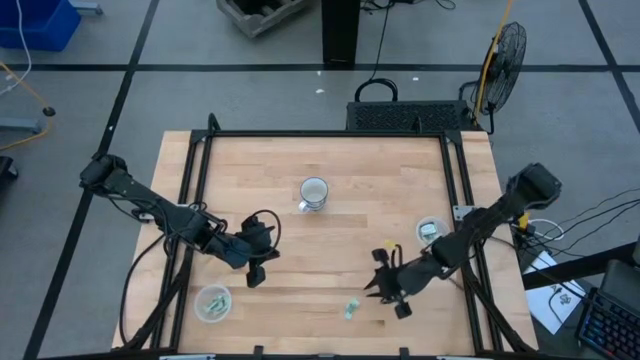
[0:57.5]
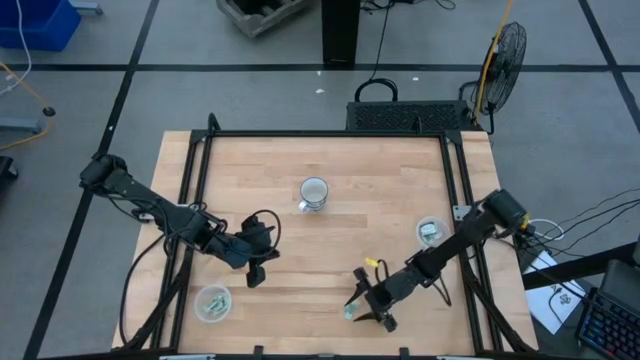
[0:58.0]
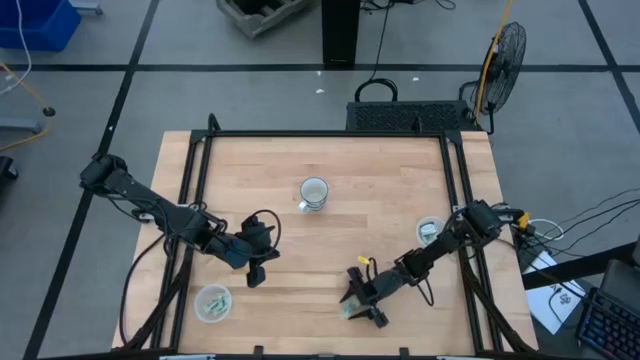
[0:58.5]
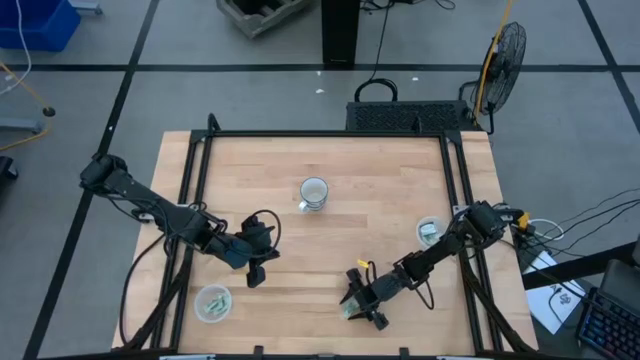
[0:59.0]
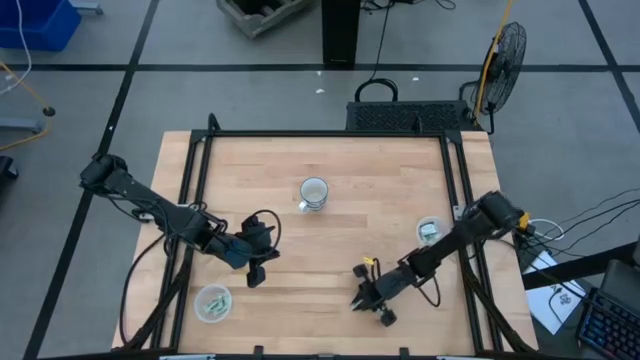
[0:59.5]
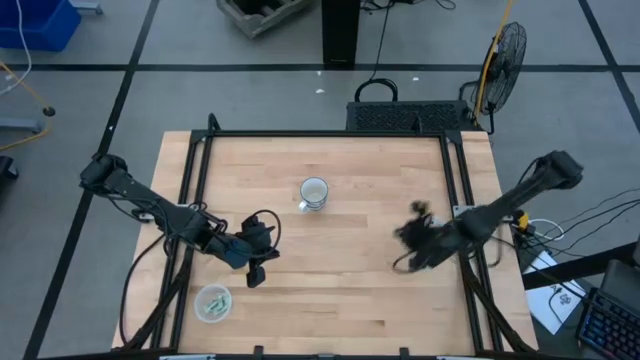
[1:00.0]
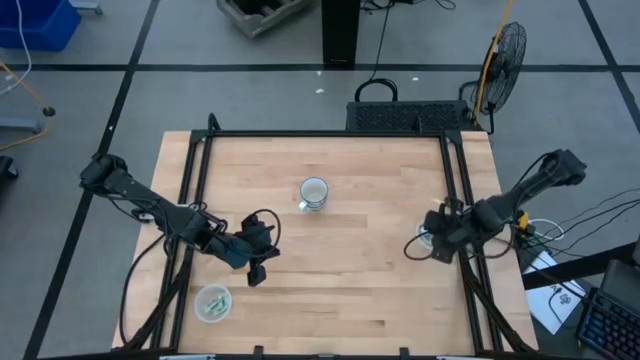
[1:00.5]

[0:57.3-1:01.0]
Task: Pick and place Stevia / Truvia into bins
Put the green stevia packet into the right transparent container

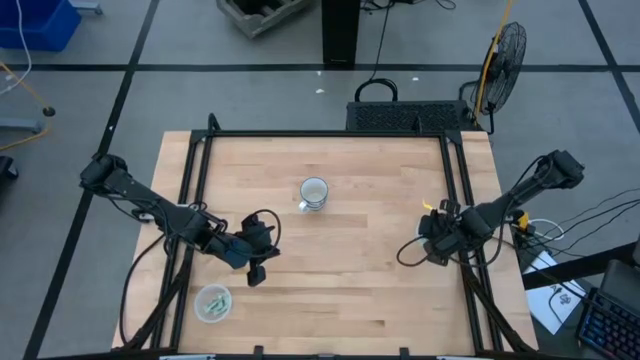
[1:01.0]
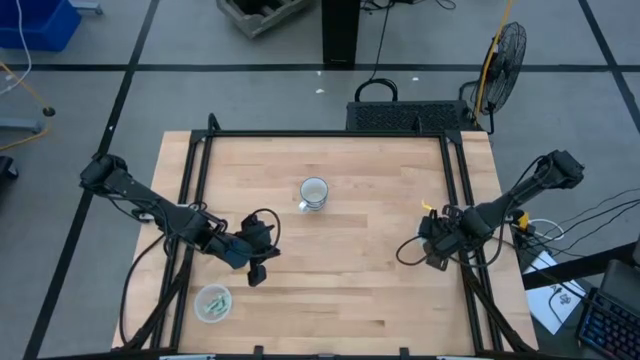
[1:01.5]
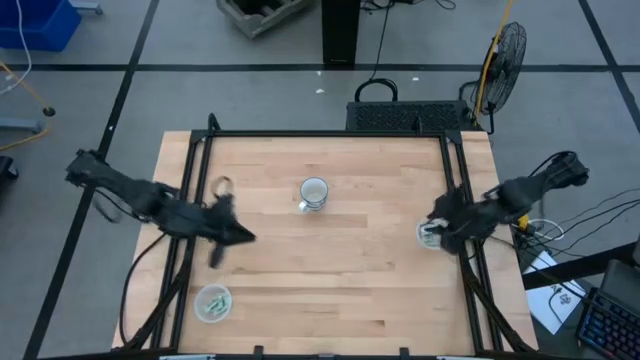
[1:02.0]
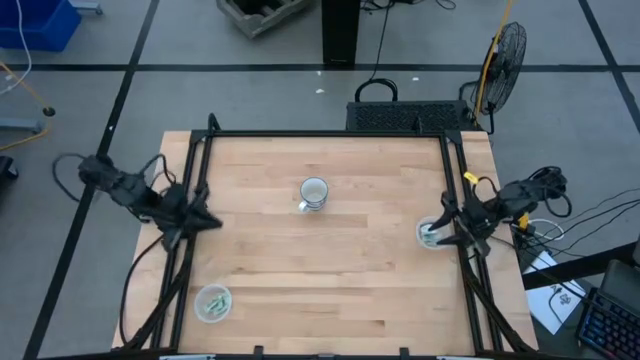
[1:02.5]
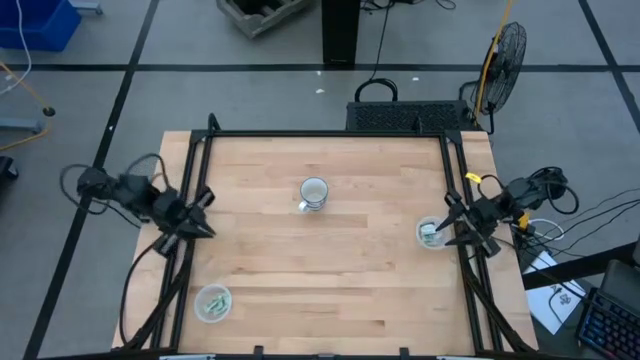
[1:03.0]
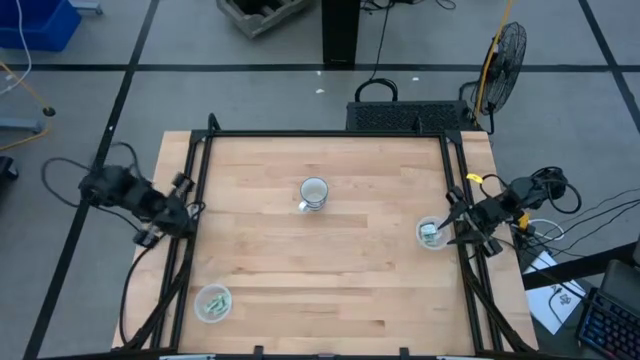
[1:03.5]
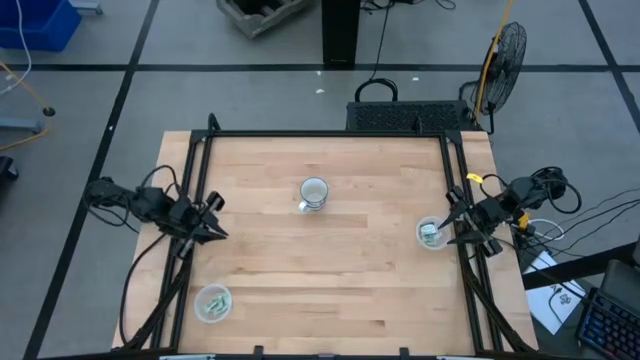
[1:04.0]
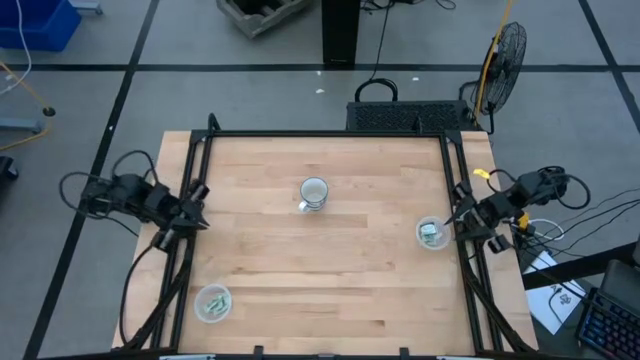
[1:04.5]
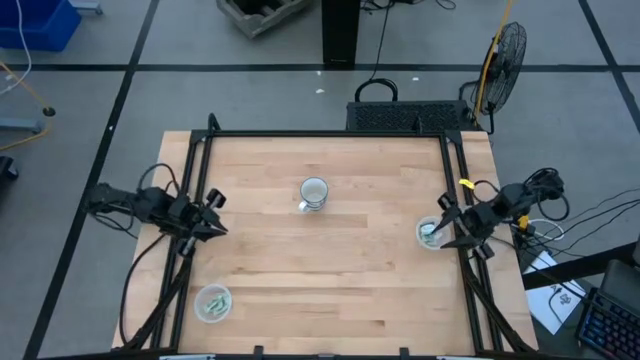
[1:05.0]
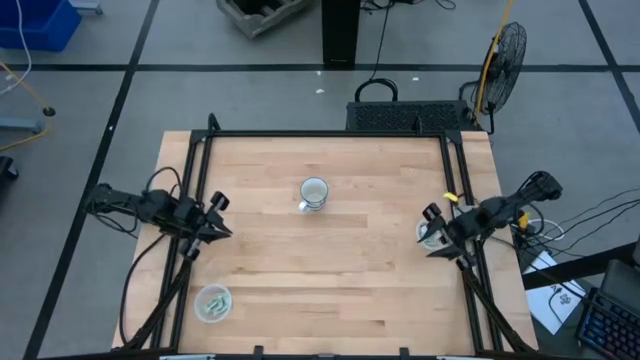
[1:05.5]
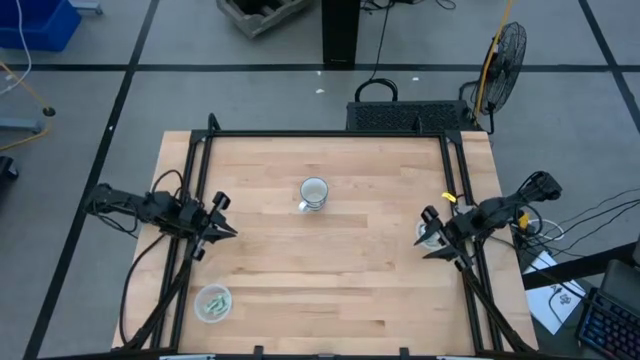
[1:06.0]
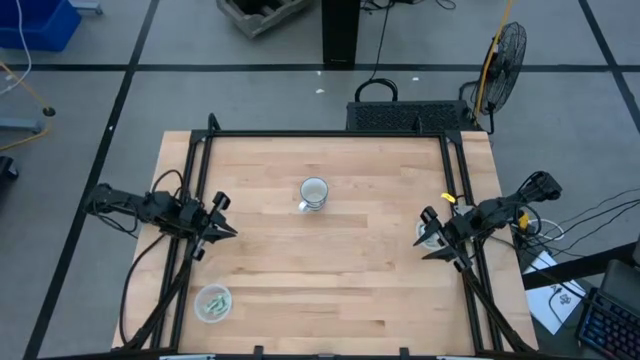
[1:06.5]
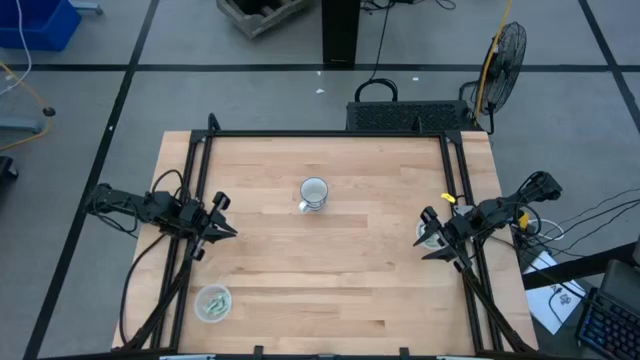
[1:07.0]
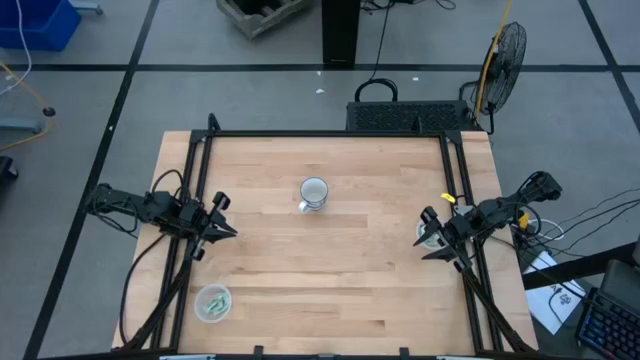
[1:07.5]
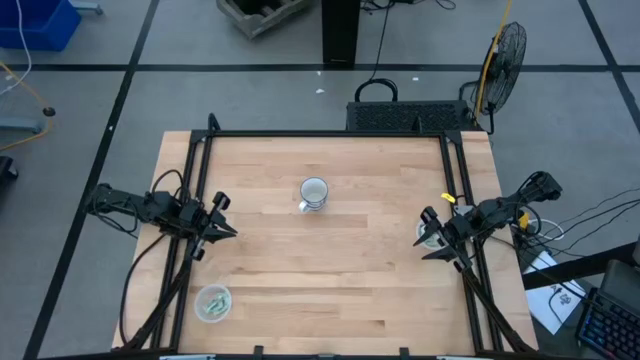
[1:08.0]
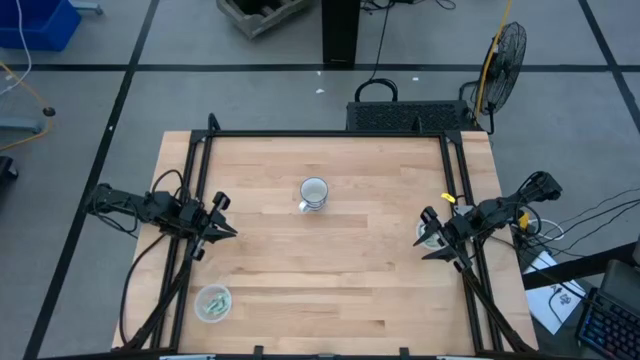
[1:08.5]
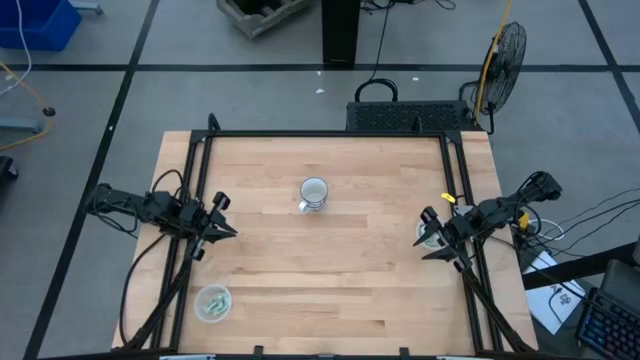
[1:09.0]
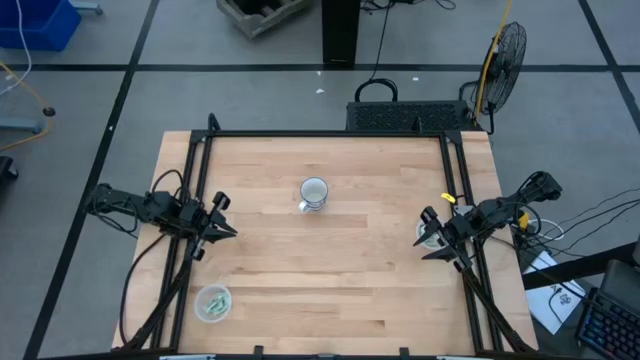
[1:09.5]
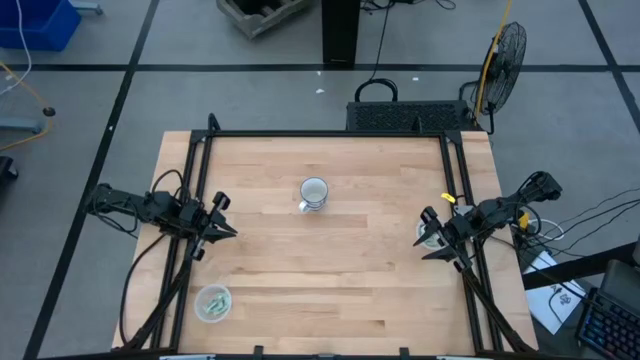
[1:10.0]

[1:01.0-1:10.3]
Return to Home Position

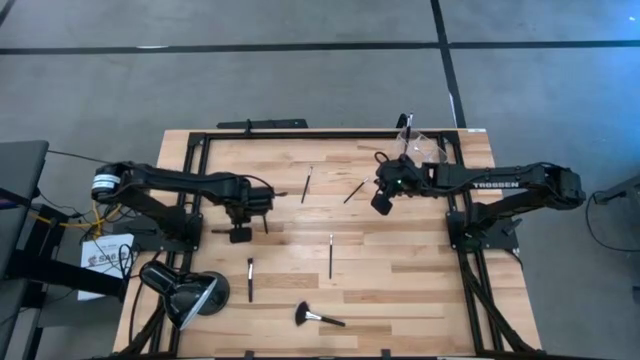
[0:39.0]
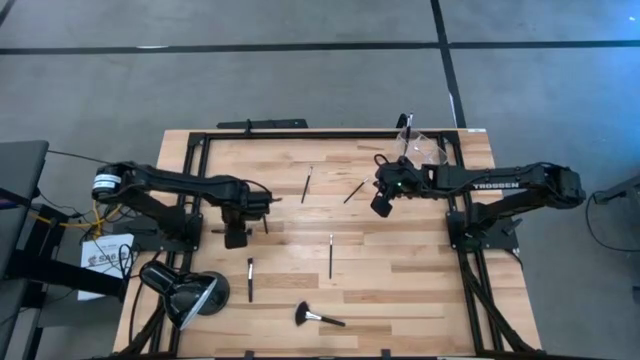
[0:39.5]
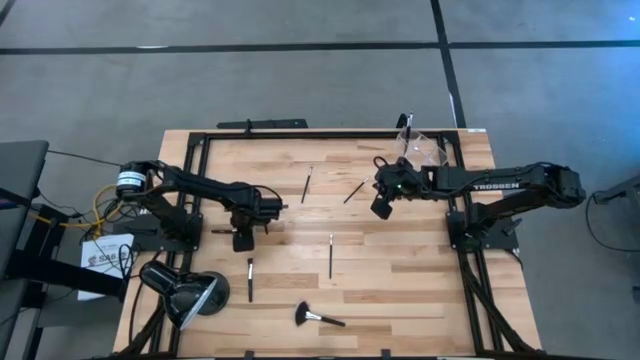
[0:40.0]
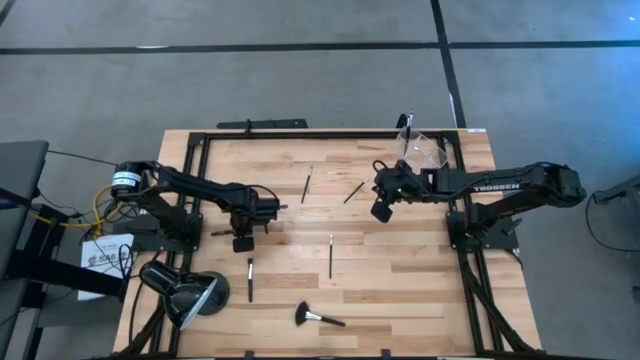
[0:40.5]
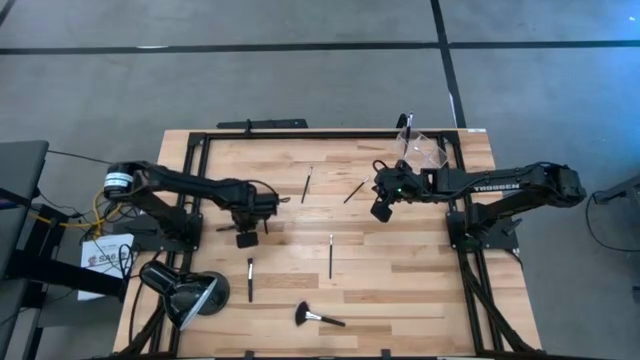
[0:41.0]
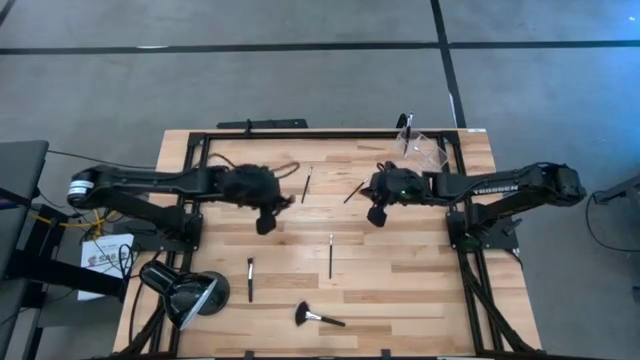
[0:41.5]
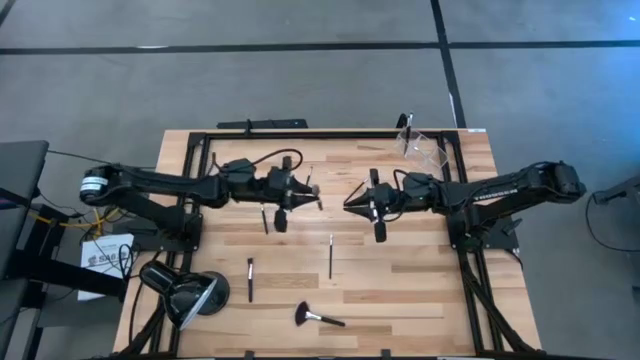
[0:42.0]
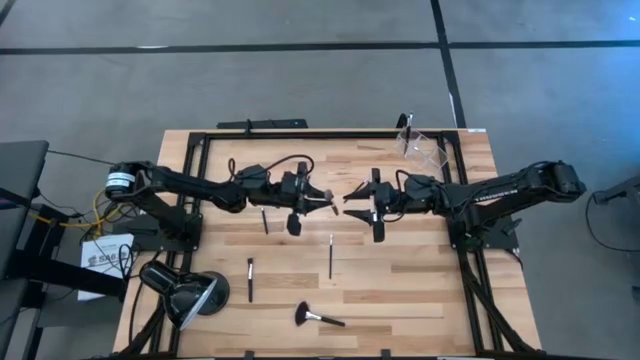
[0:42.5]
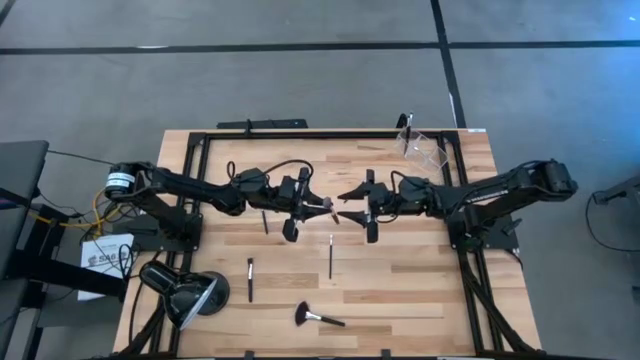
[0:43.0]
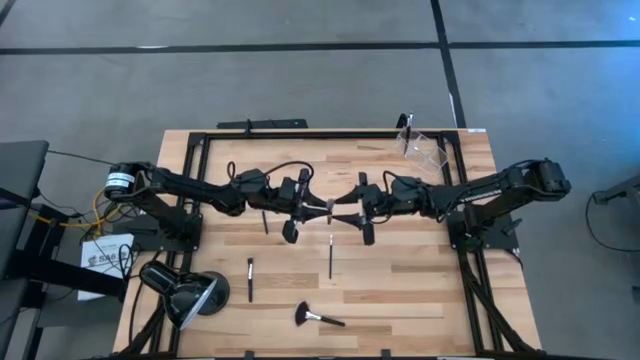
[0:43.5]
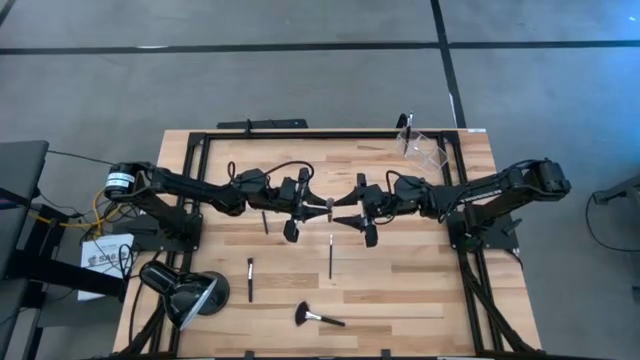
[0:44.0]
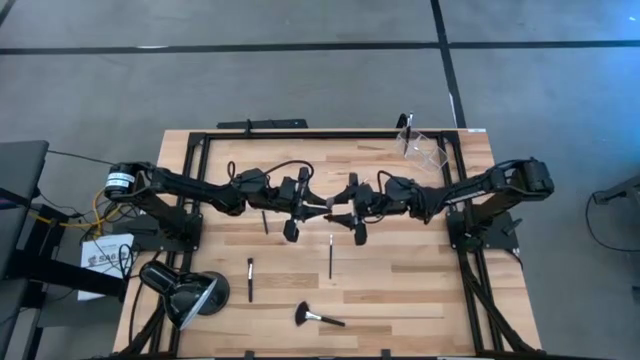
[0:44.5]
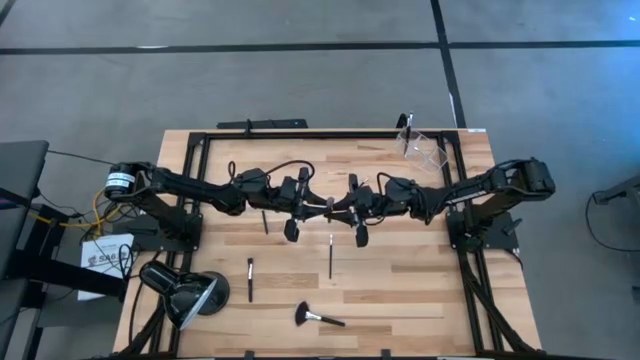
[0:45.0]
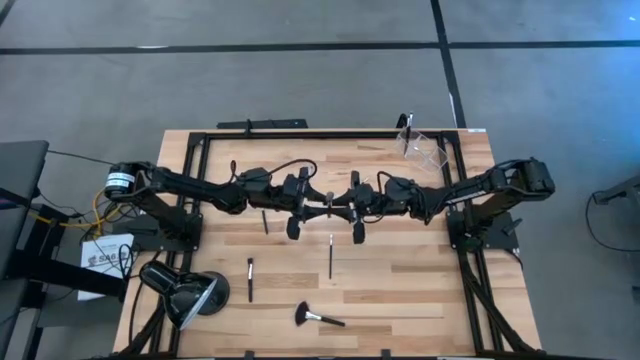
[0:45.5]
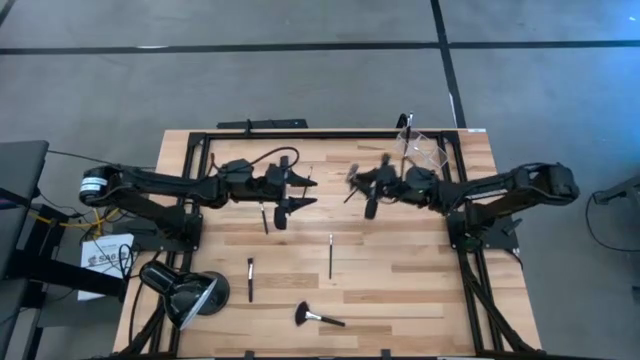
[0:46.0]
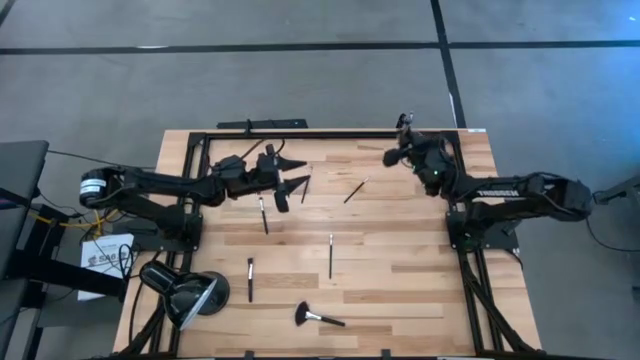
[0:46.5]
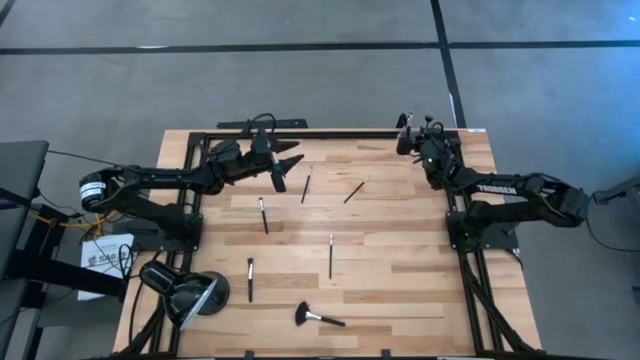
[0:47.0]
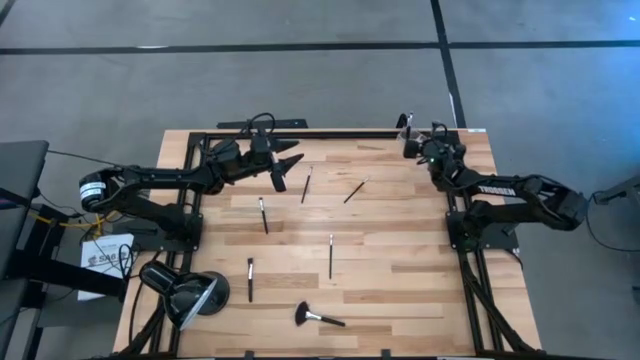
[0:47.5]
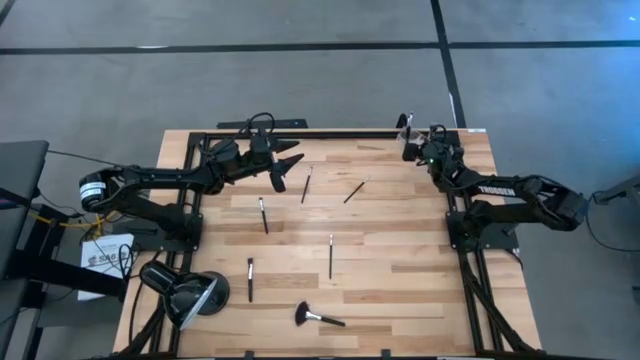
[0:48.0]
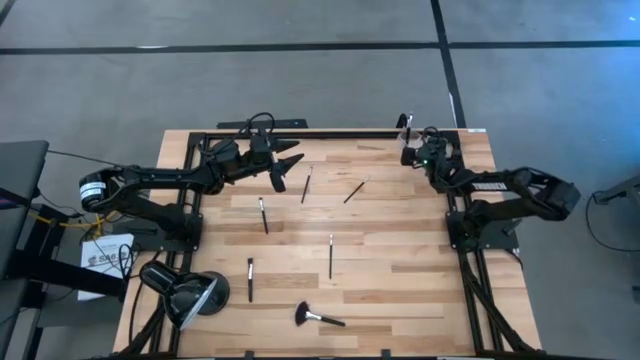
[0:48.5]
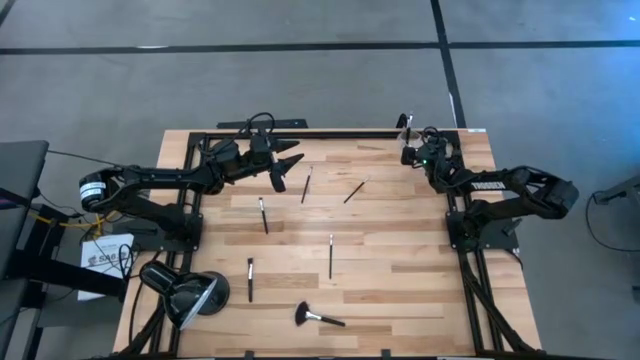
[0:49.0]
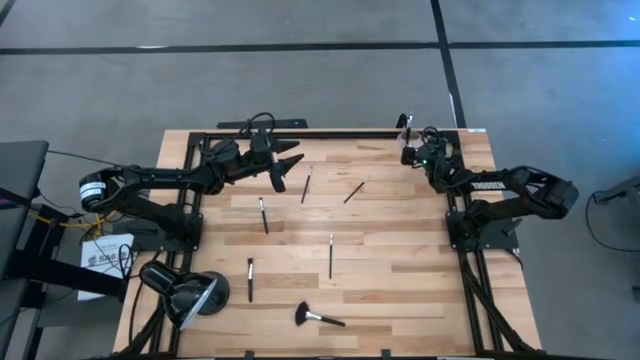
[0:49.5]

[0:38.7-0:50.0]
Task: Put items in baskets/containers
Put the black powder brush into the transparent organizer
